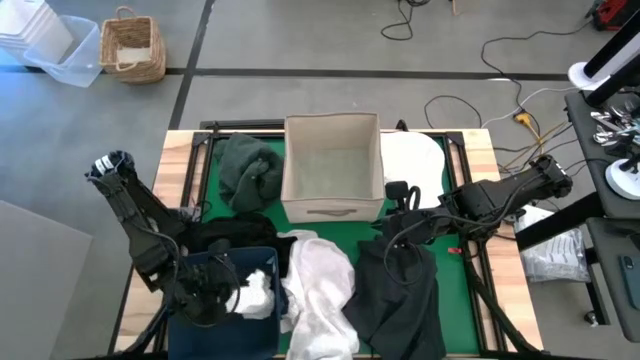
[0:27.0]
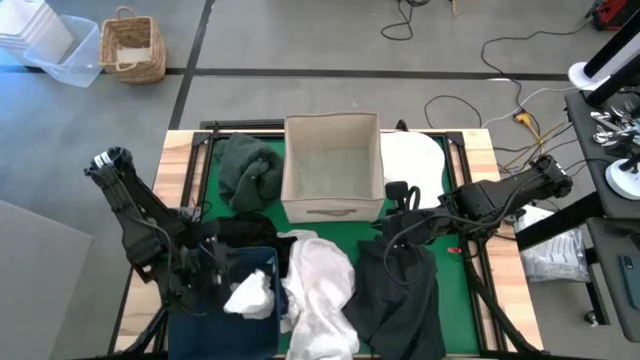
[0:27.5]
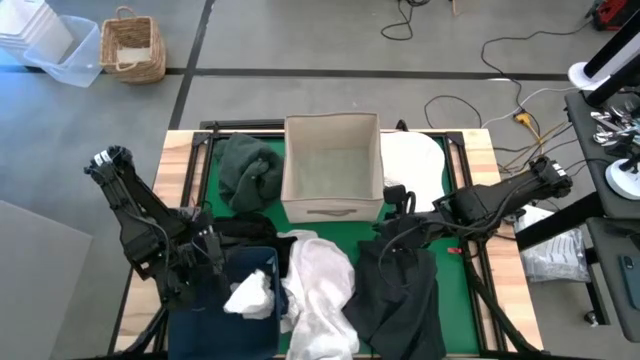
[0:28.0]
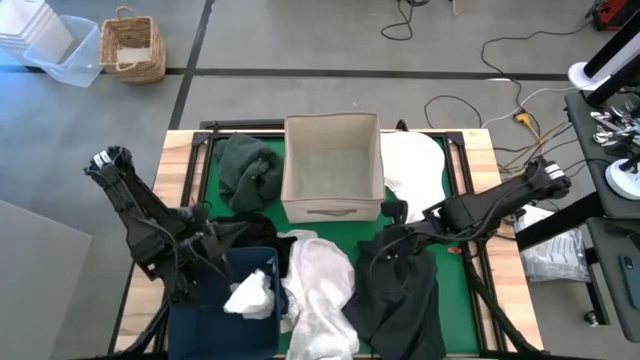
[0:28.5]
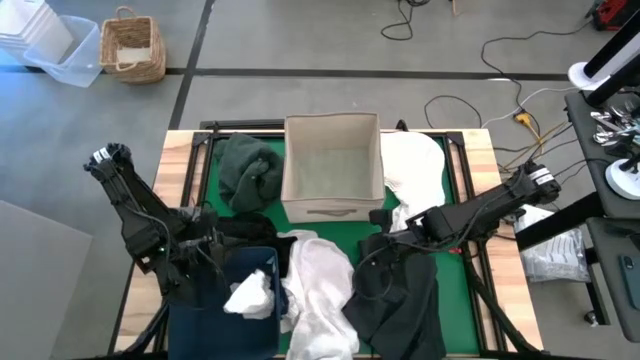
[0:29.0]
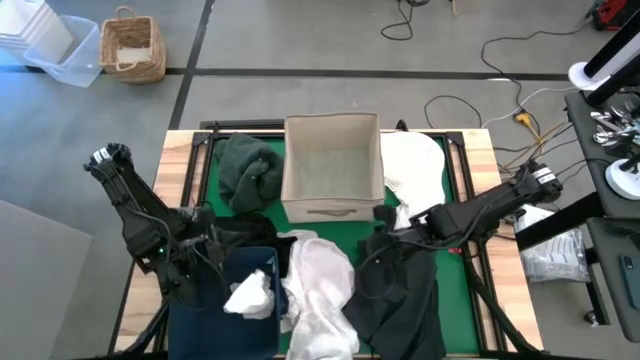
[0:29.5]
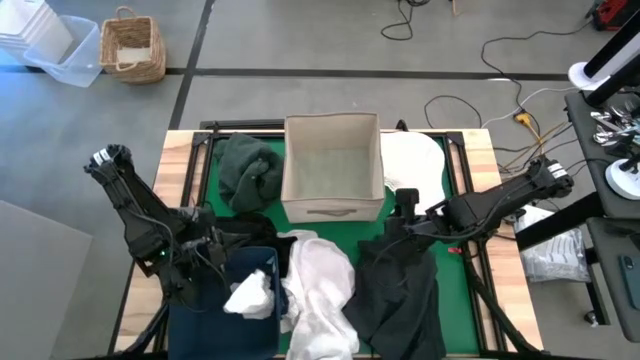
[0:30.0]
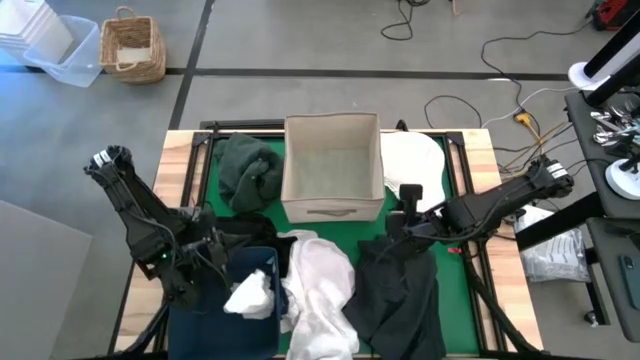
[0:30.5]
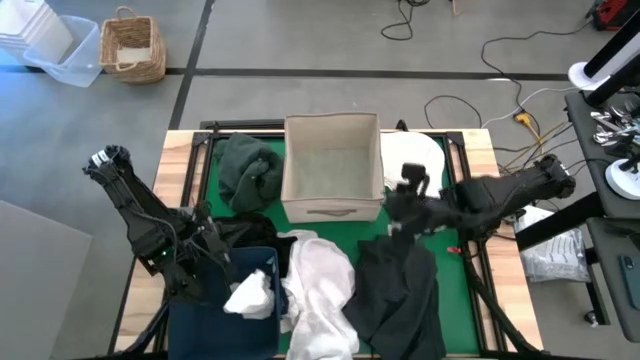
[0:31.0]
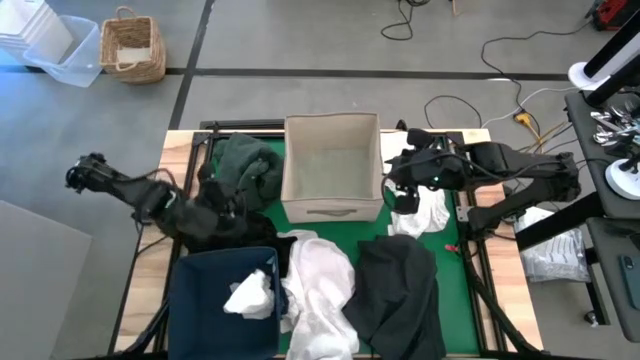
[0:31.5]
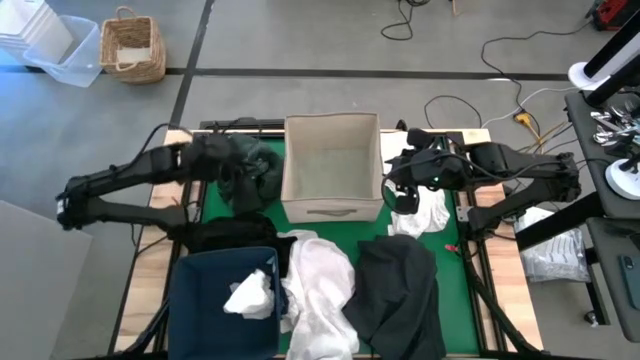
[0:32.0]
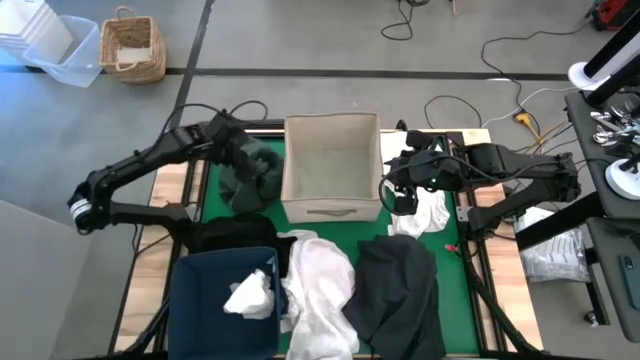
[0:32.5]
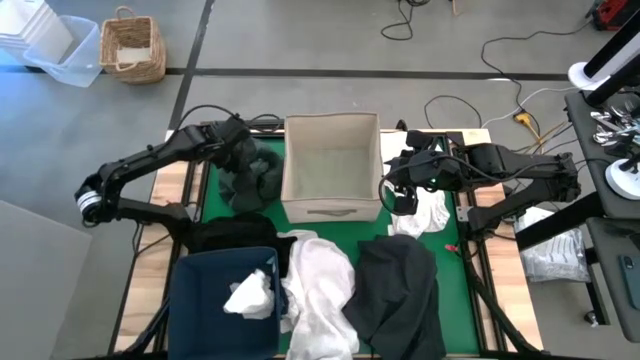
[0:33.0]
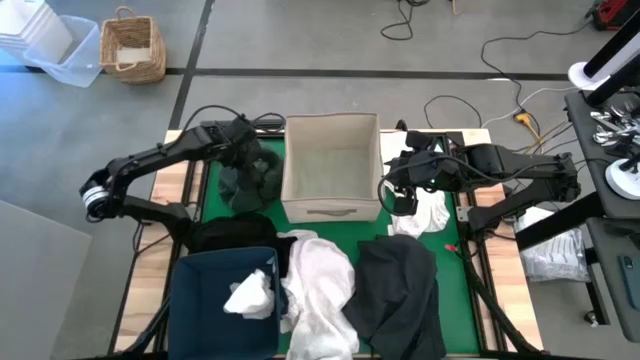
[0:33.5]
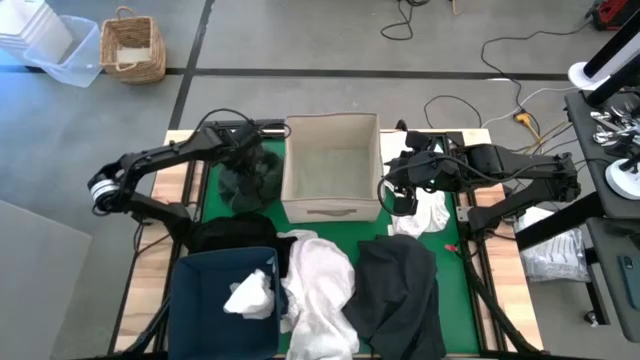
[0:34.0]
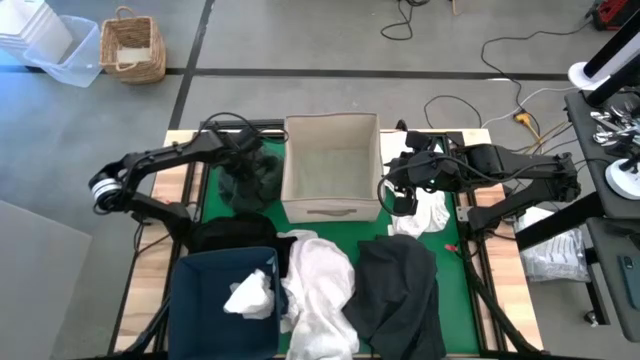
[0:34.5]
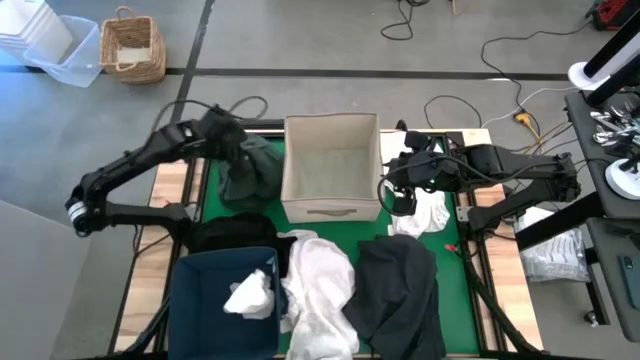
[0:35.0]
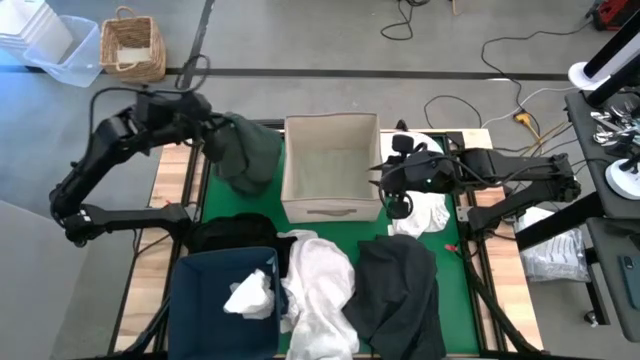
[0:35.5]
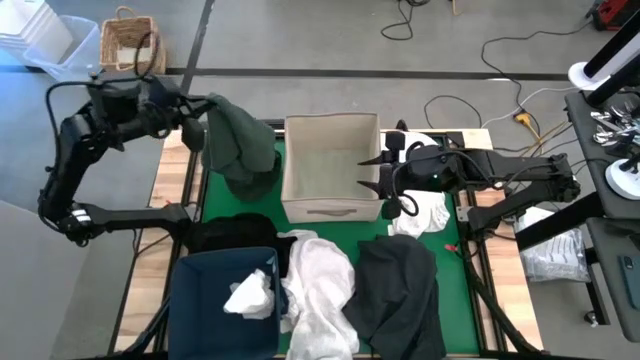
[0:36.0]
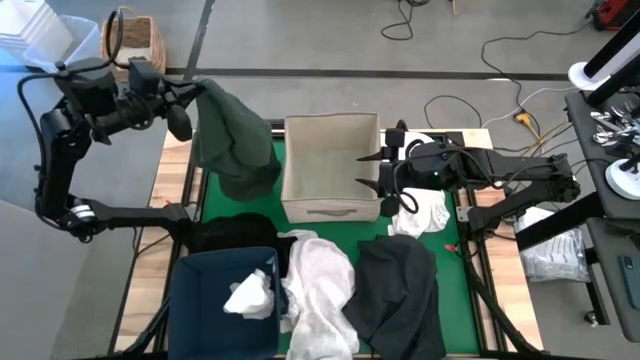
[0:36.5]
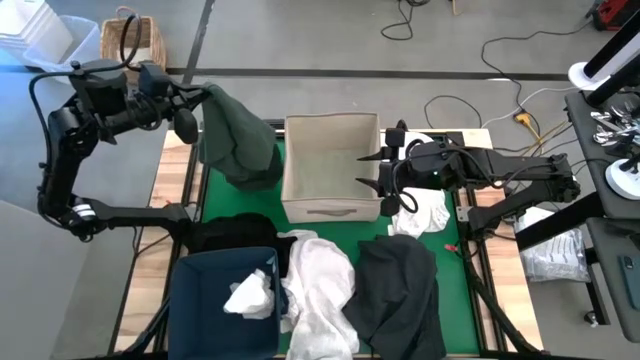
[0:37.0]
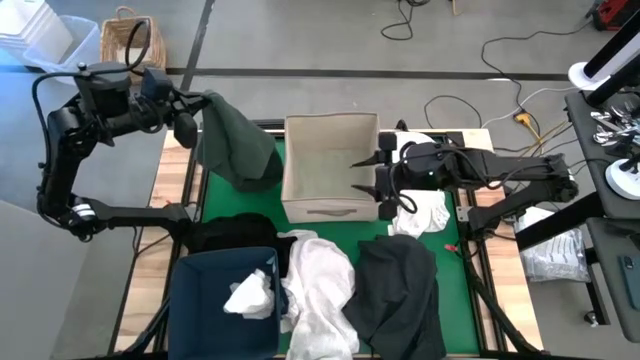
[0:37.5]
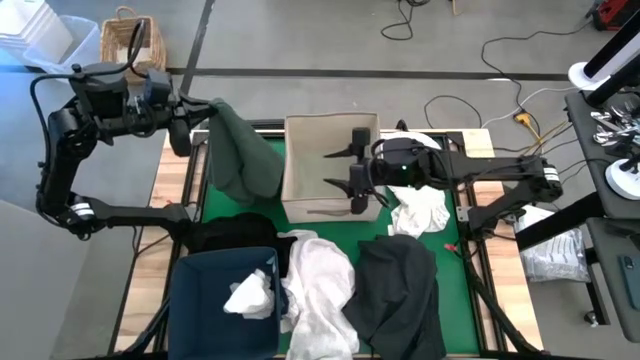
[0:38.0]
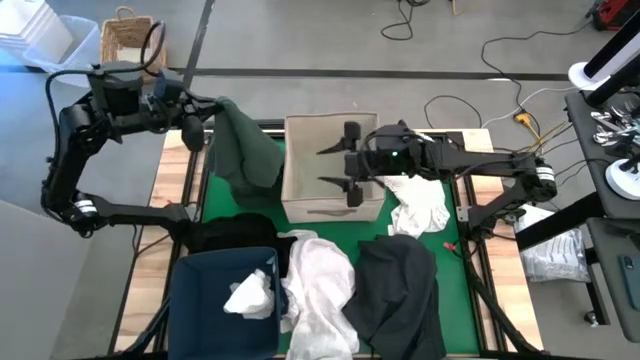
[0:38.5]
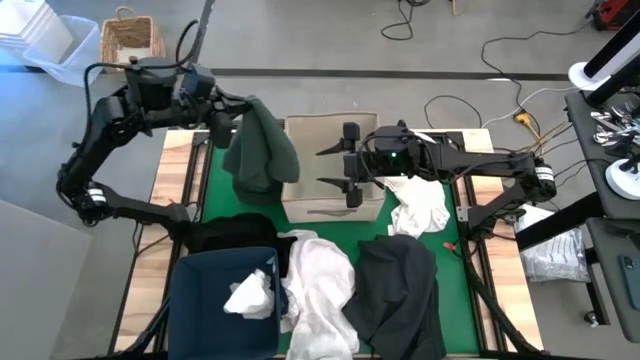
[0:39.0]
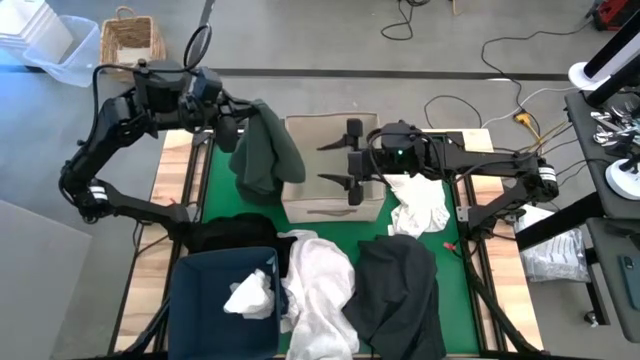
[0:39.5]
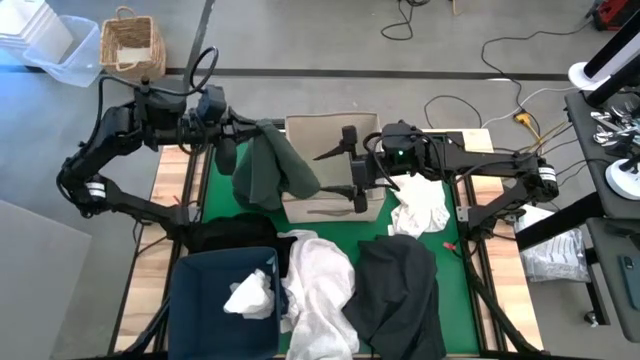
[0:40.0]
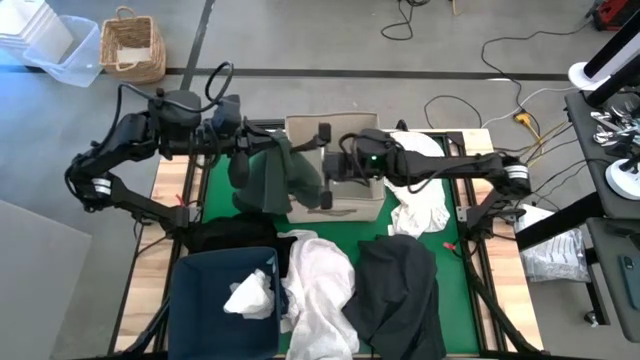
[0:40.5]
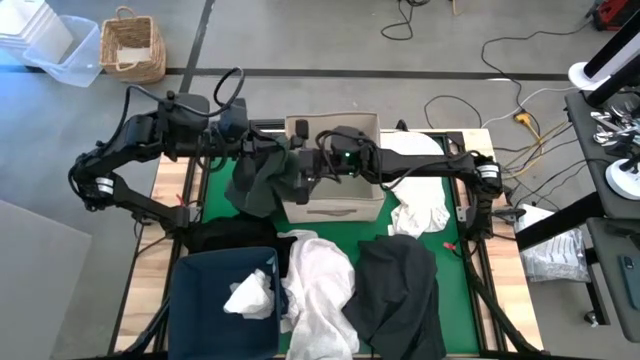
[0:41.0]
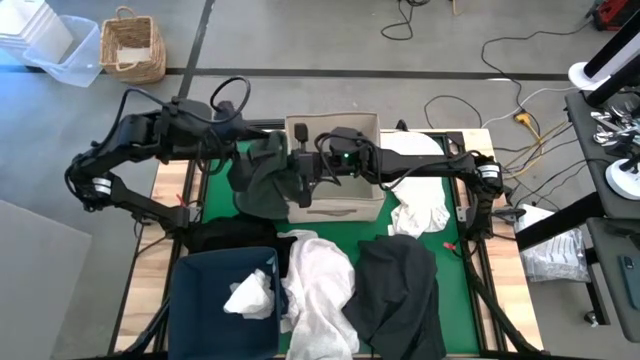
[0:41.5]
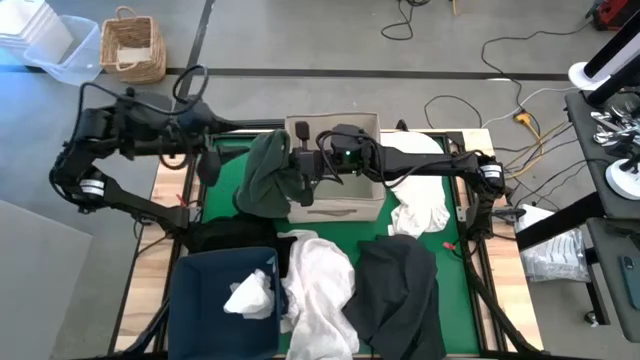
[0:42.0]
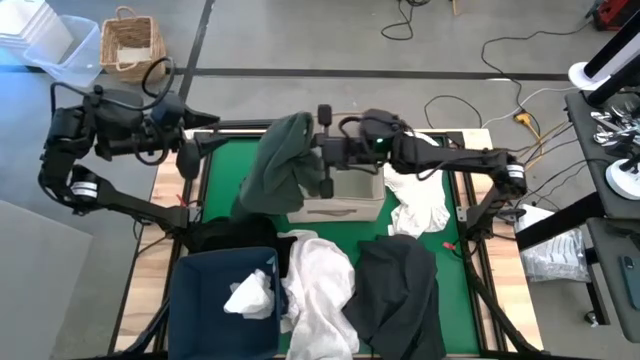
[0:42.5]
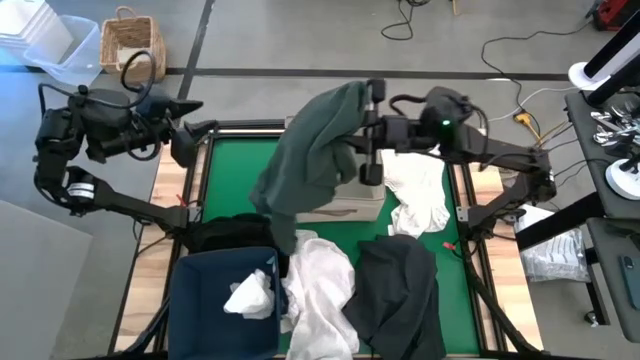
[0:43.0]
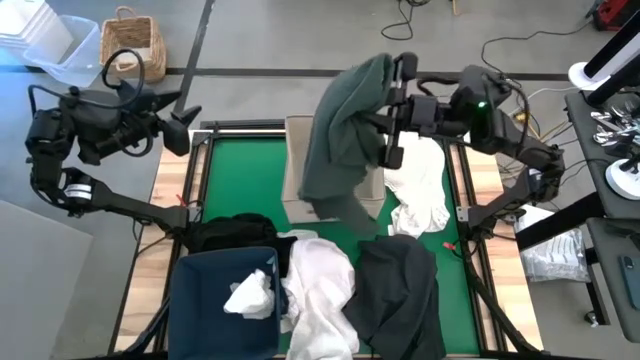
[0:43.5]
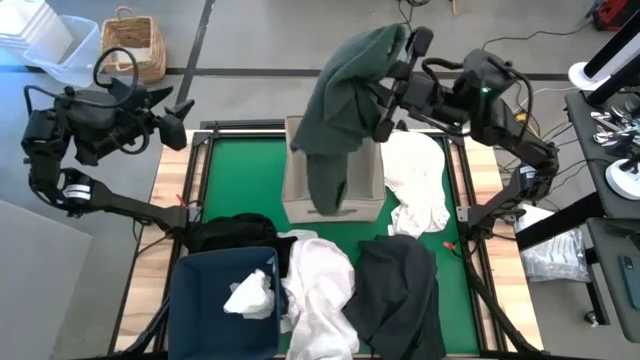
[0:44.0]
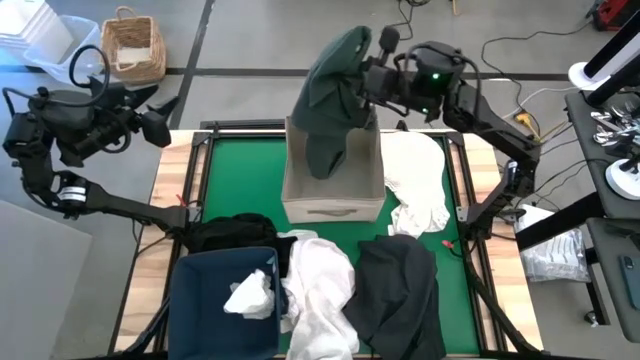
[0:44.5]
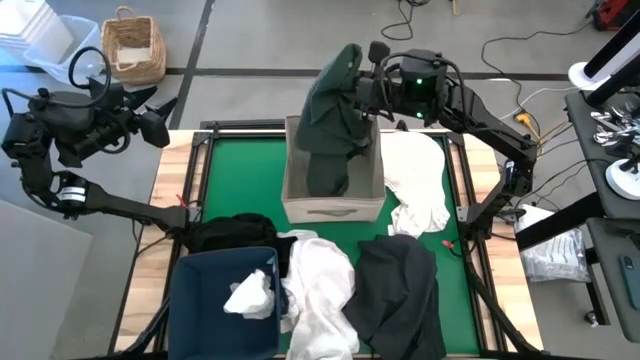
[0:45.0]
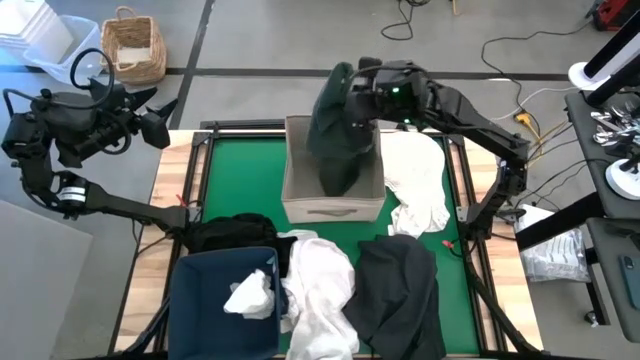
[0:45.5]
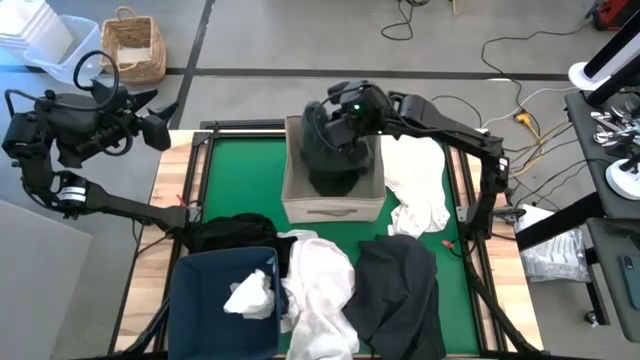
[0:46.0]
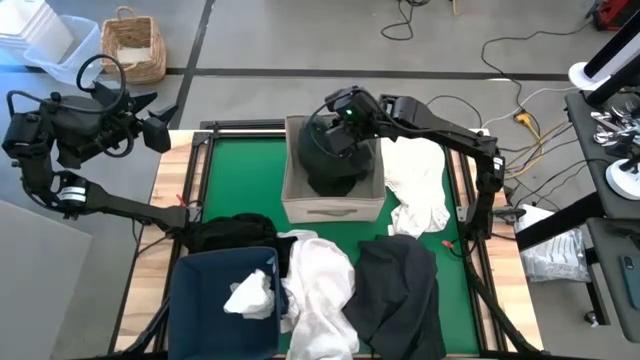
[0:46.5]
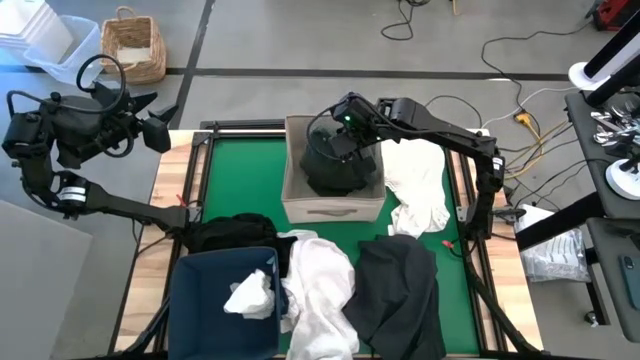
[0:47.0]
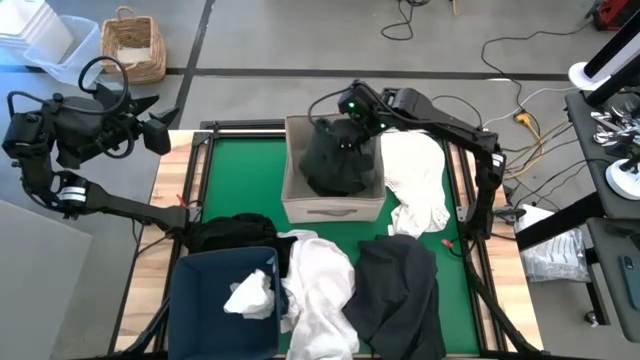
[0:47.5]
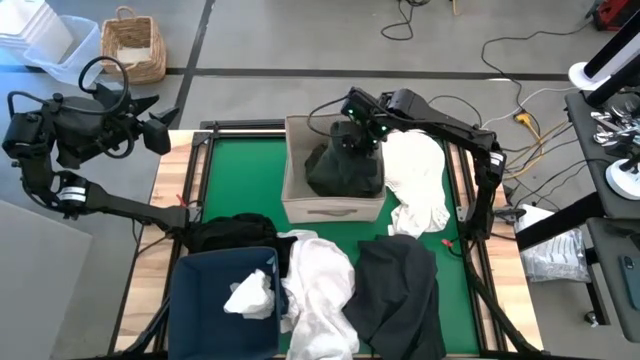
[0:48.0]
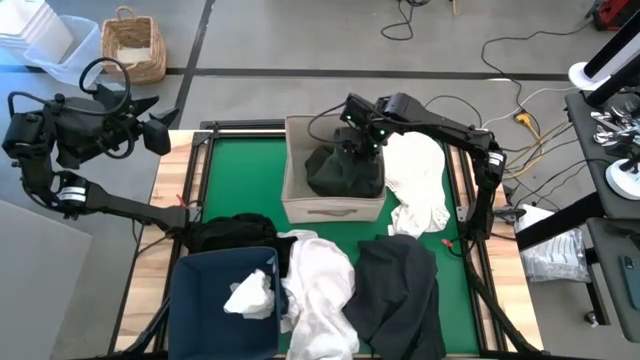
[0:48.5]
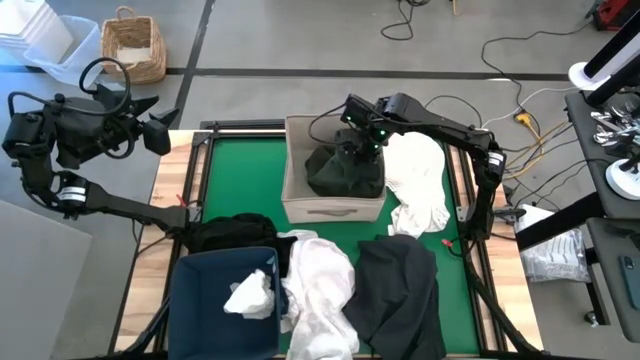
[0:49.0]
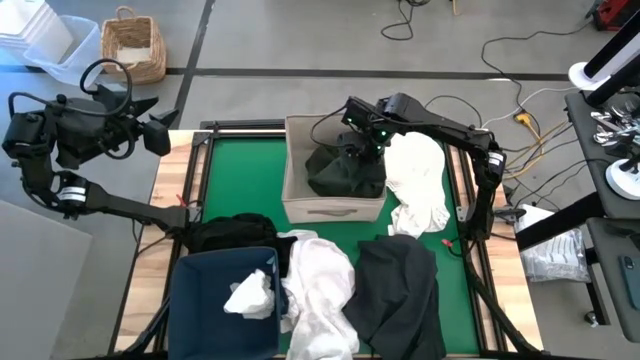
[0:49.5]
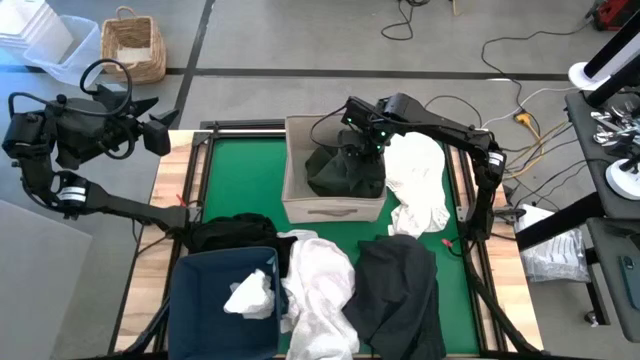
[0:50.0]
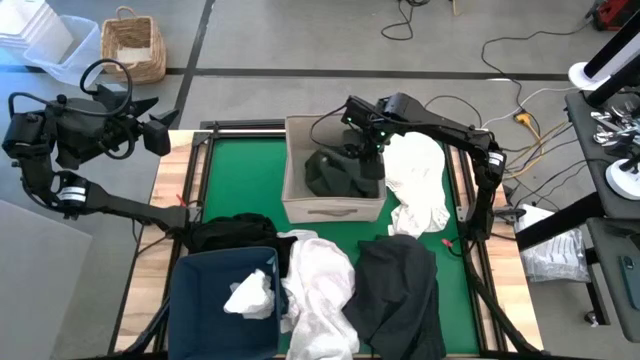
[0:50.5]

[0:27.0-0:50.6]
Put the green polo shirt into the brown laundry bin
